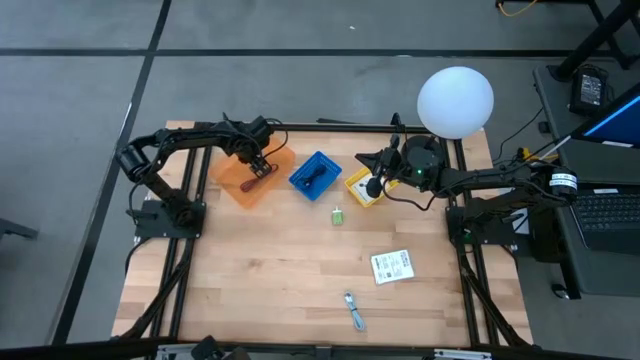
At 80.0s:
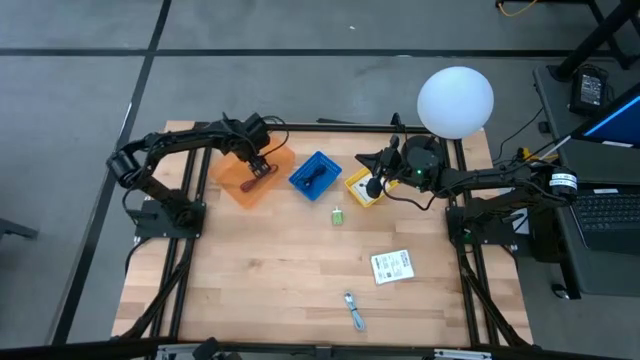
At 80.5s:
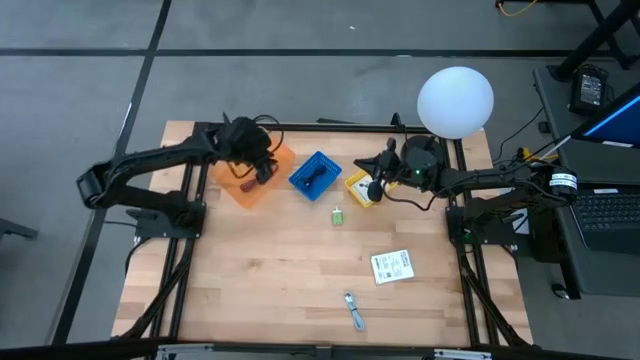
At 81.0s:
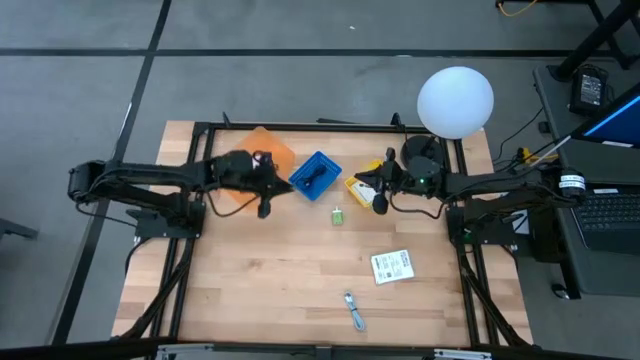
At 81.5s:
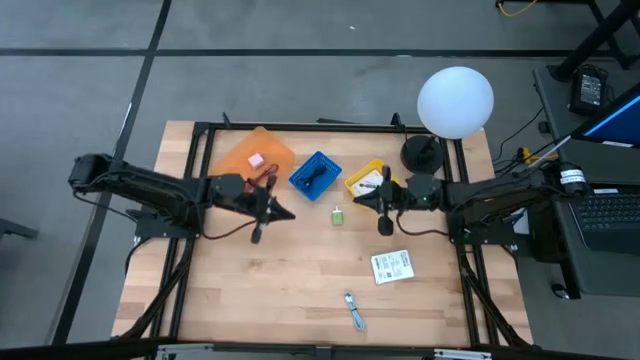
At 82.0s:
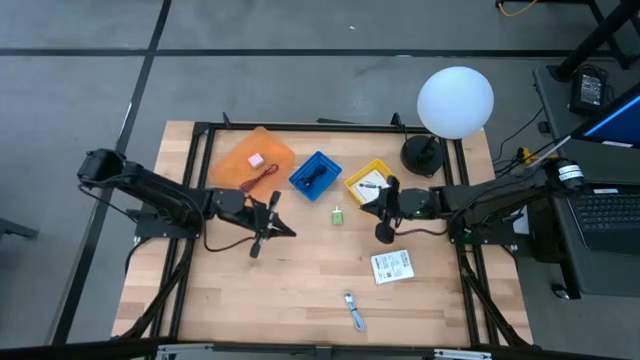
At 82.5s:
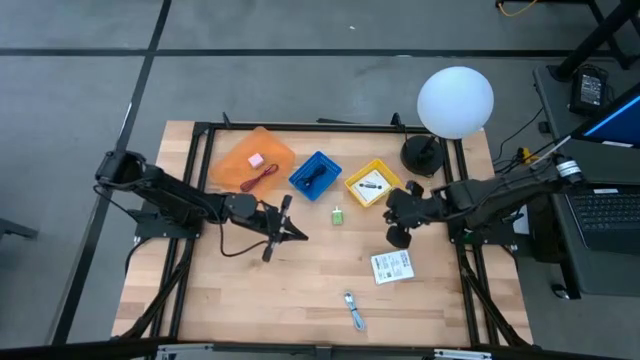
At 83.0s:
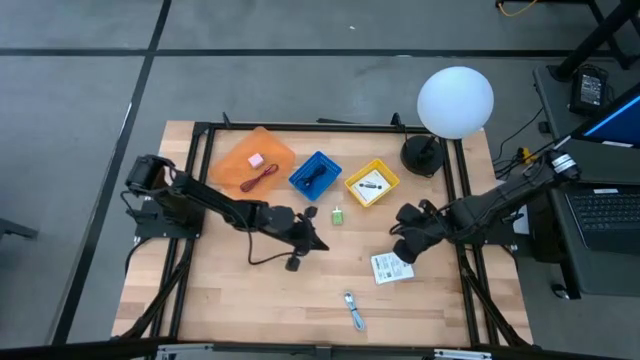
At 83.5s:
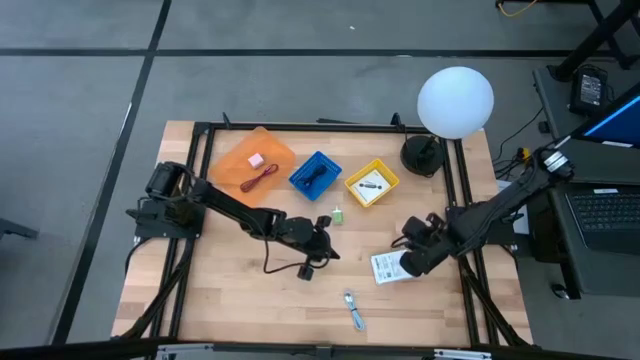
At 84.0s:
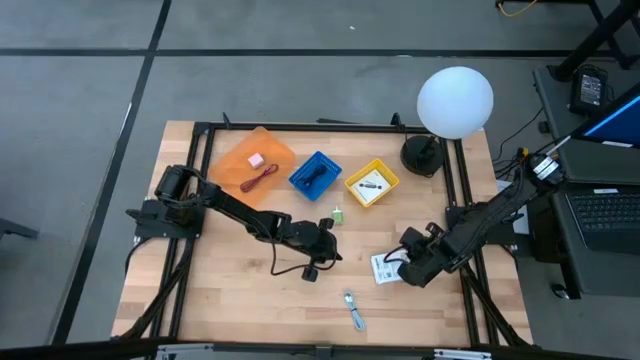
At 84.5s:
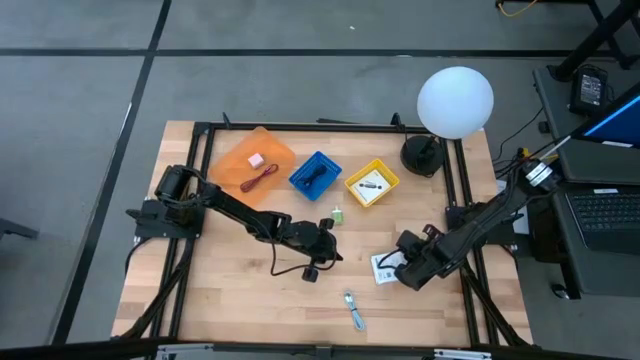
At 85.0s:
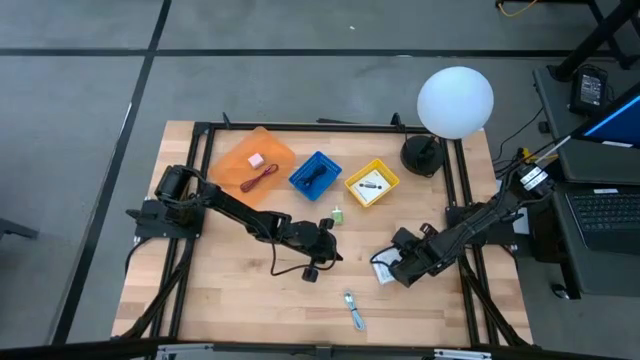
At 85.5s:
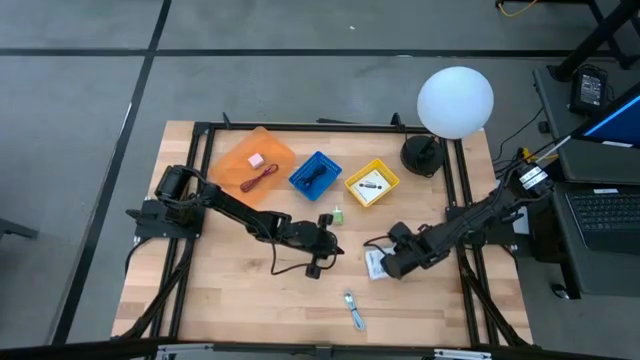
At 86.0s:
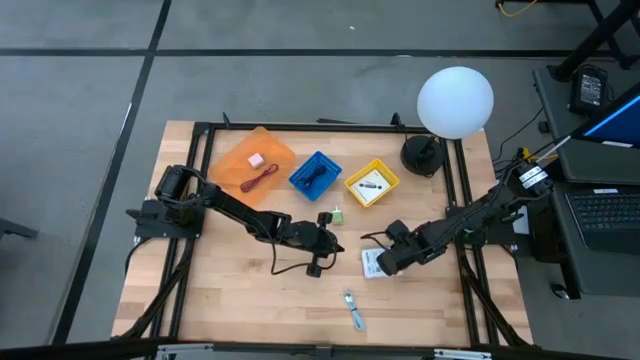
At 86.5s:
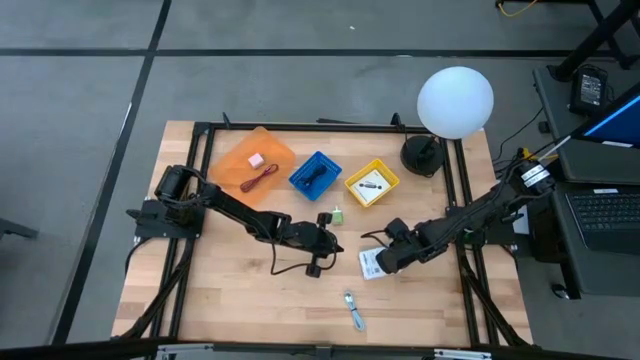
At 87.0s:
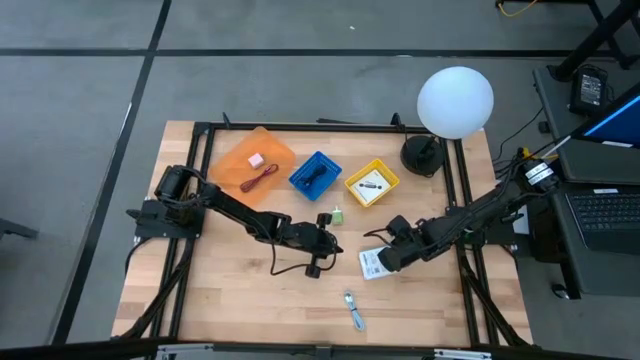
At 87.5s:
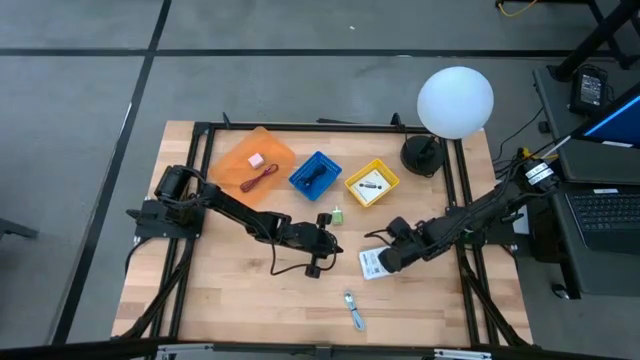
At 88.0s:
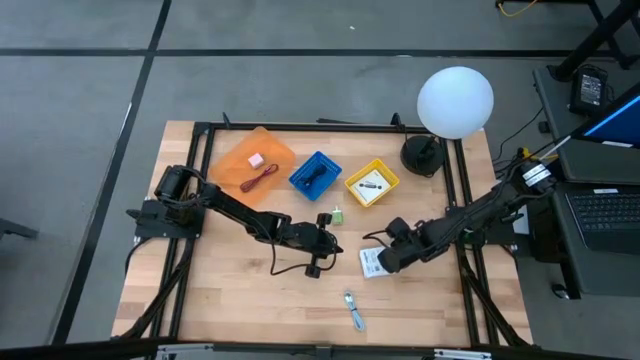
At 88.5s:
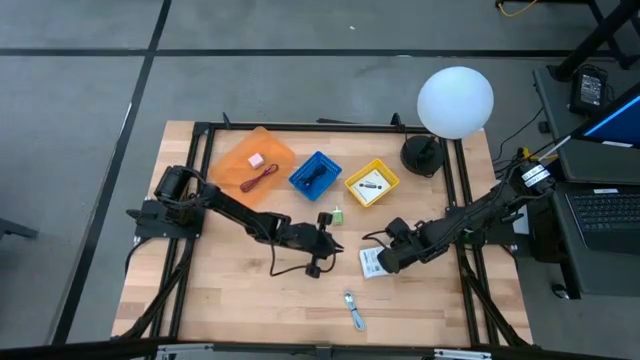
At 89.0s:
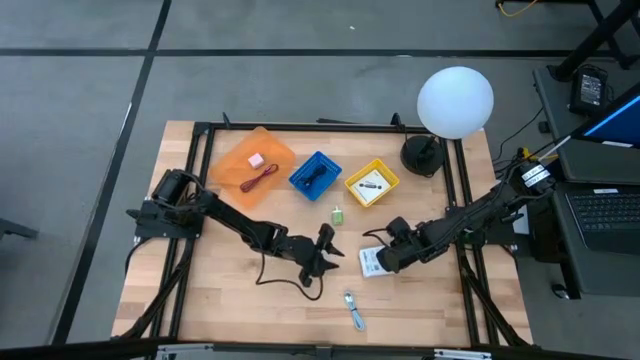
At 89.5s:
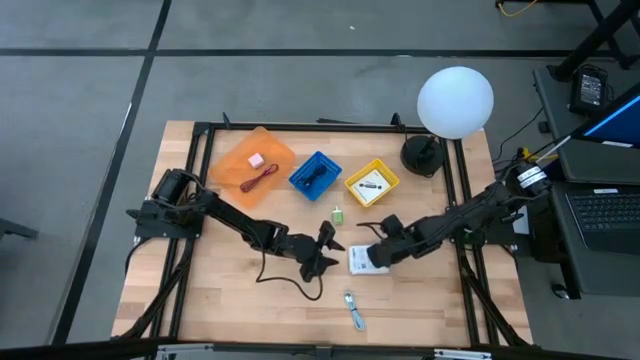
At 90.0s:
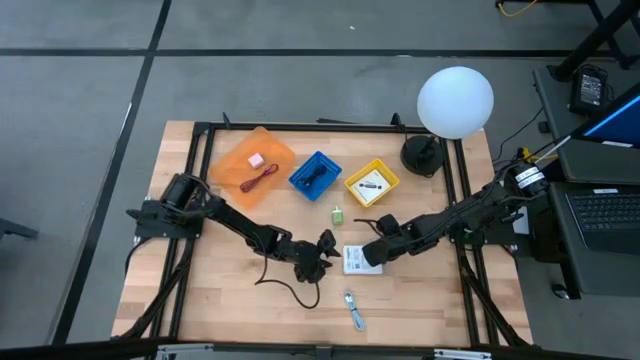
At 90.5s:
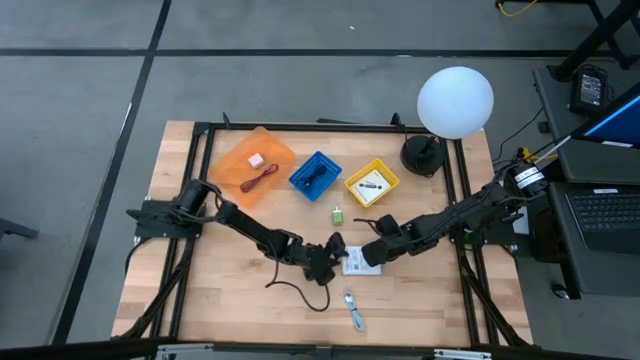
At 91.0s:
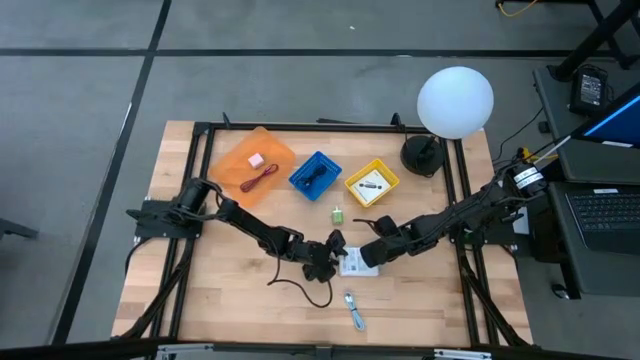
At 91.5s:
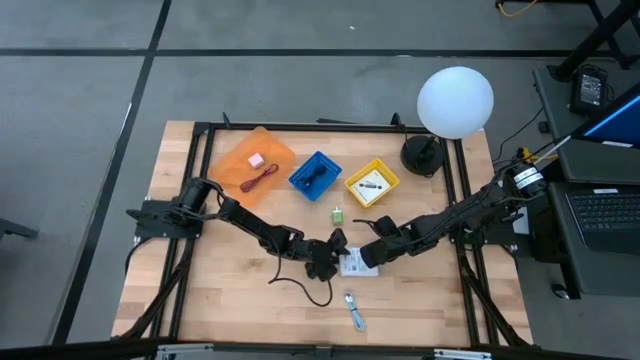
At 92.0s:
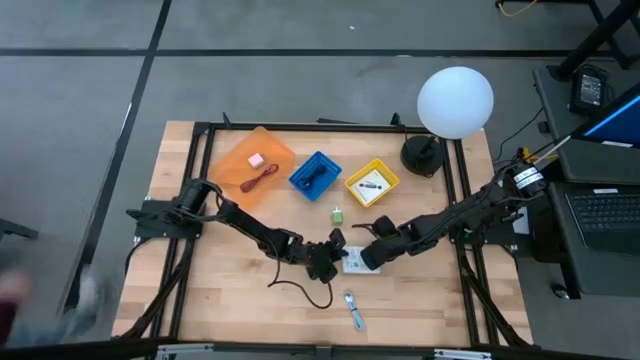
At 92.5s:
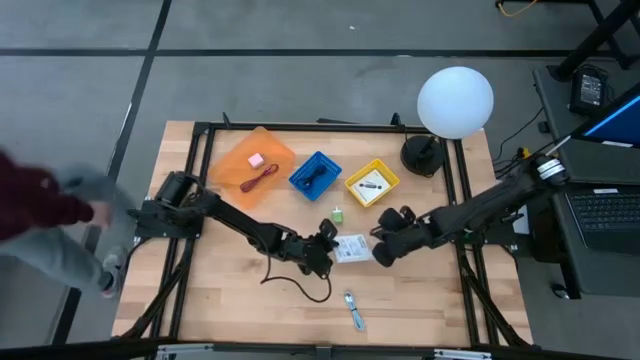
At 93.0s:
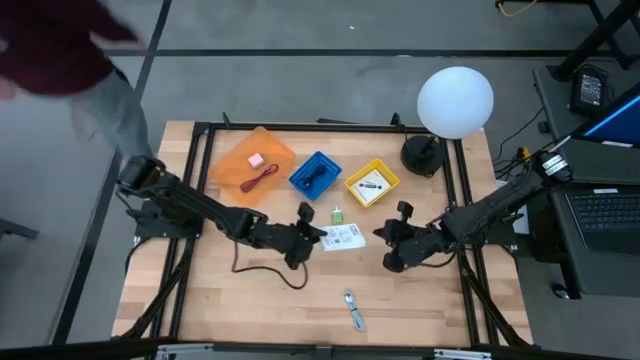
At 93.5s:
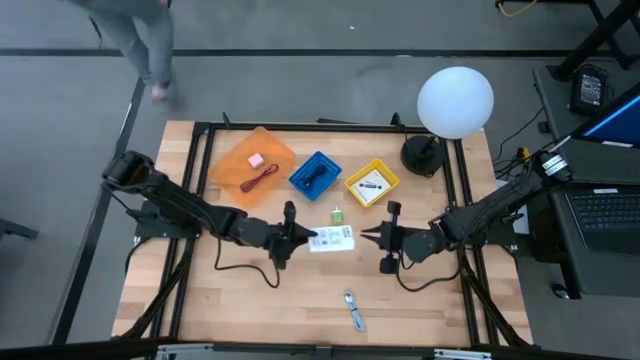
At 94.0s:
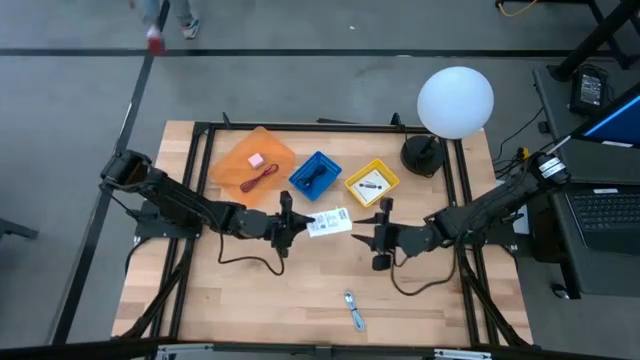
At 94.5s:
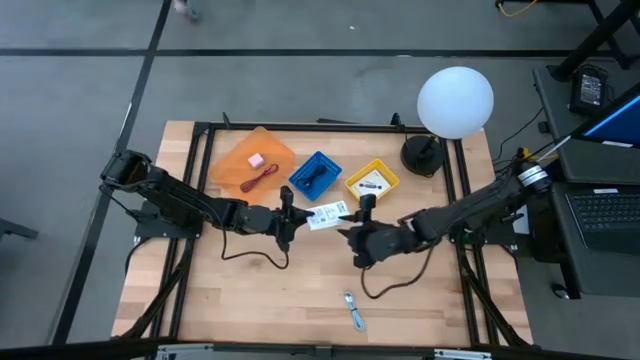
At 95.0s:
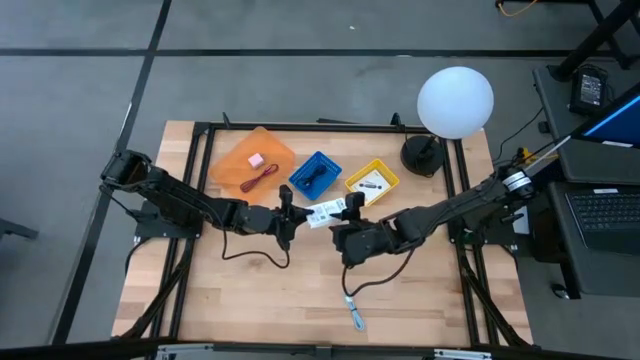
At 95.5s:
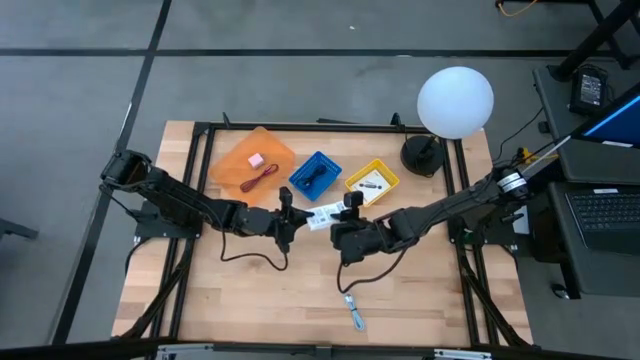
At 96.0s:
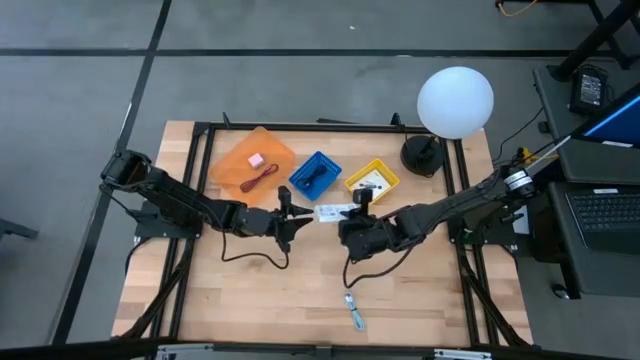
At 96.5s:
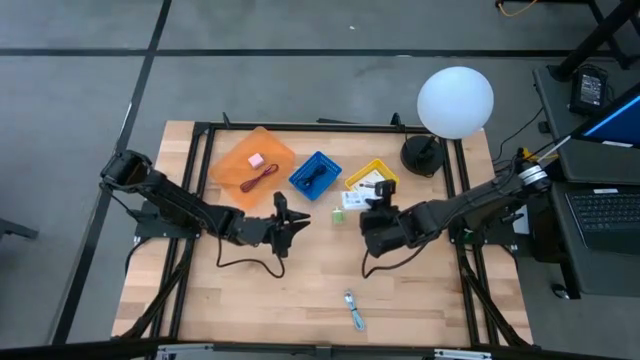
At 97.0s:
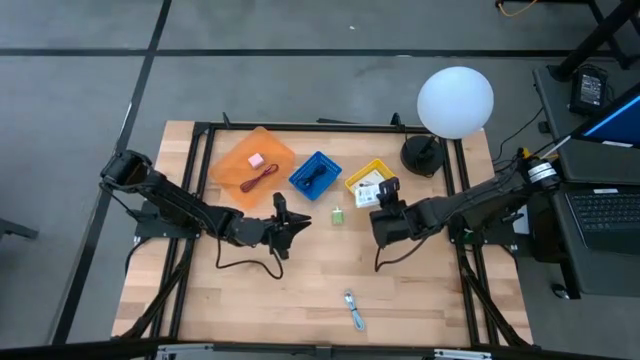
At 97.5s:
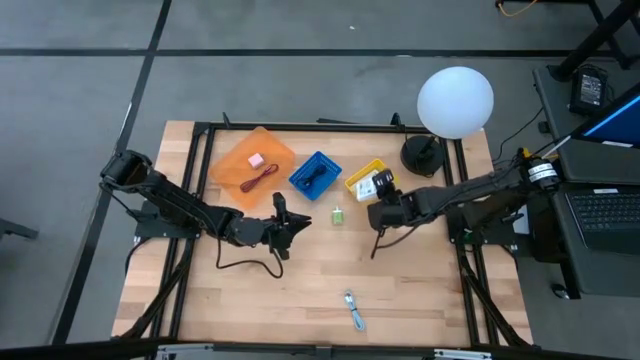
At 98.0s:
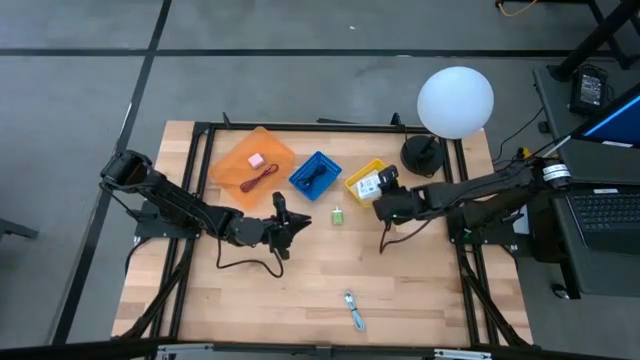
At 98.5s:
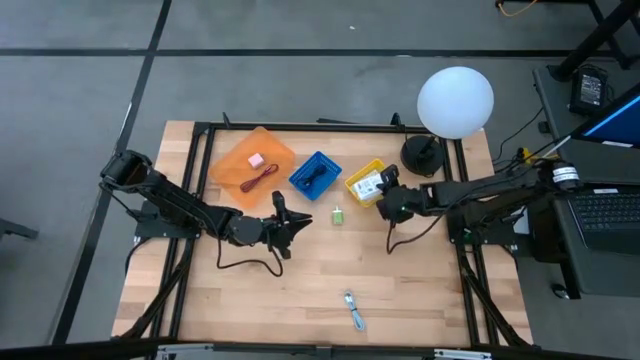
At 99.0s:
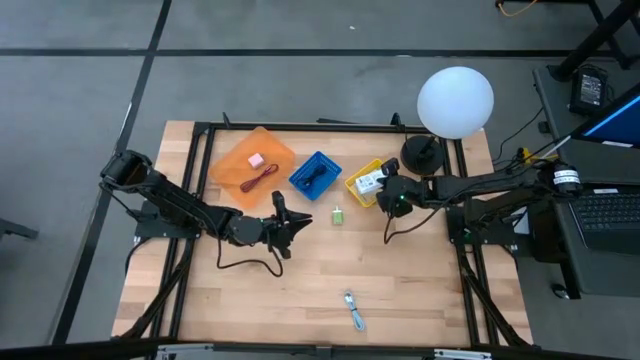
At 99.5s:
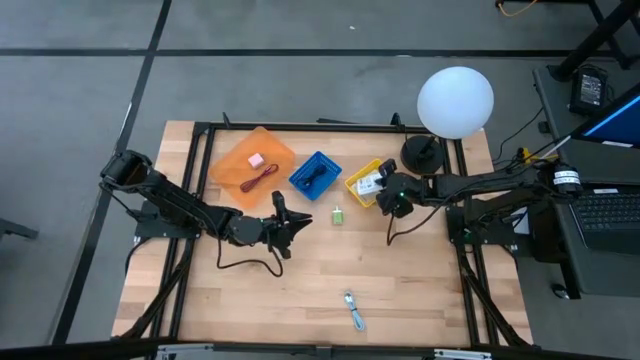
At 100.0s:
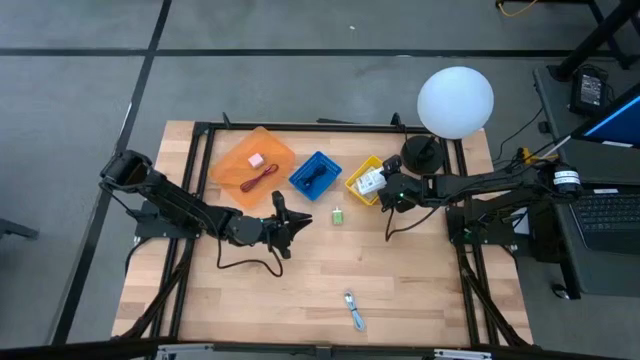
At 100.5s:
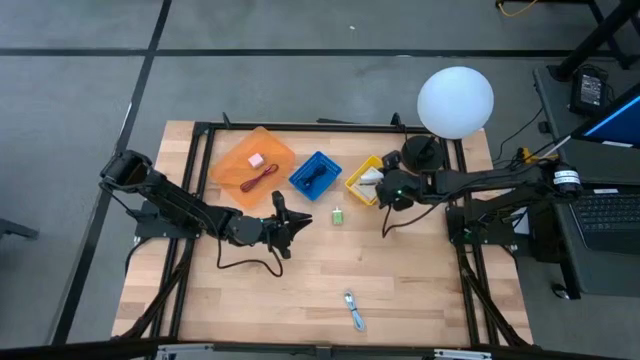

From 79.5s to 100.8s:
Task: Pick and place items into bin
Put the white card reader box into the yellow bin
